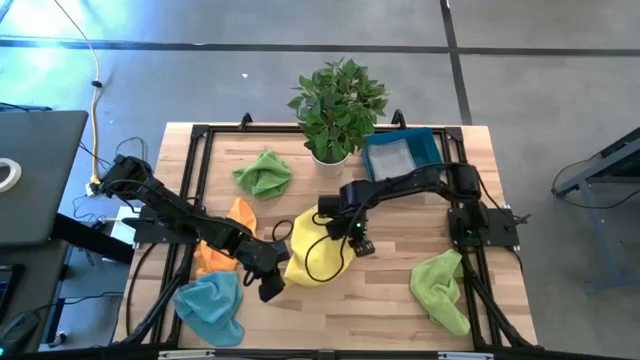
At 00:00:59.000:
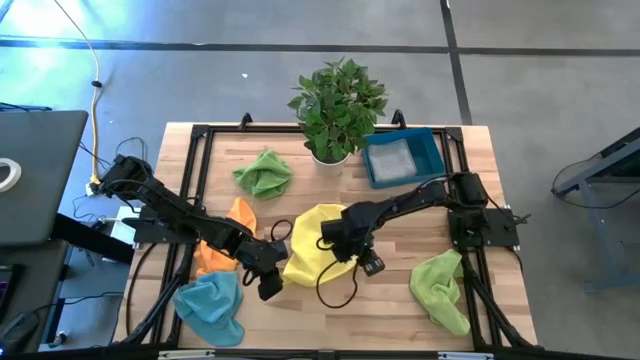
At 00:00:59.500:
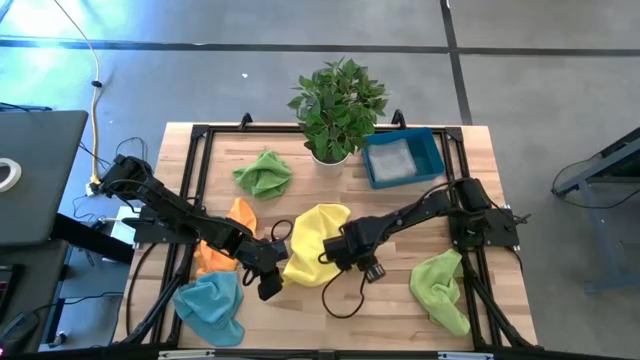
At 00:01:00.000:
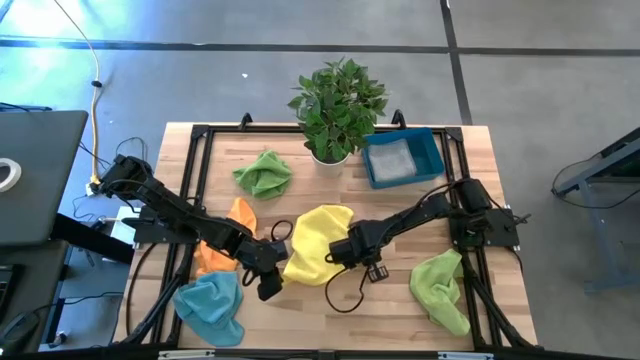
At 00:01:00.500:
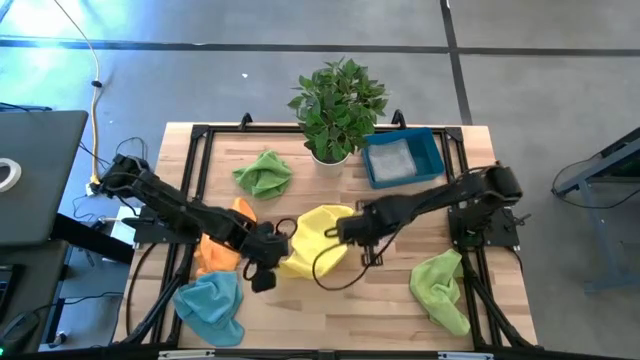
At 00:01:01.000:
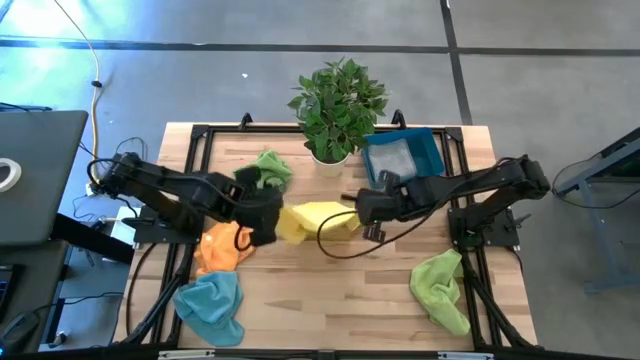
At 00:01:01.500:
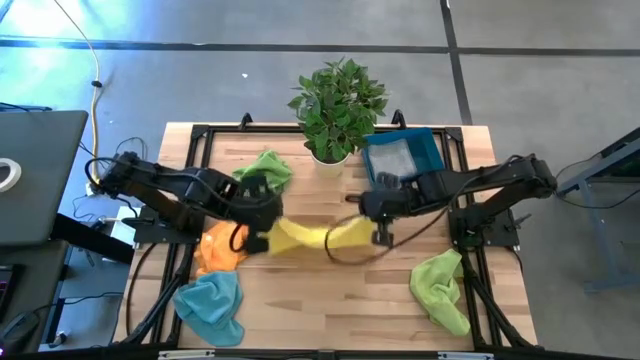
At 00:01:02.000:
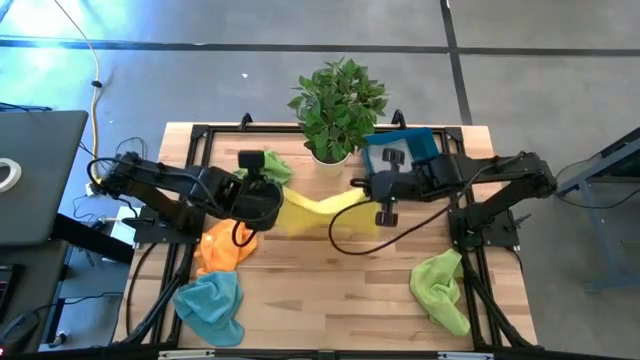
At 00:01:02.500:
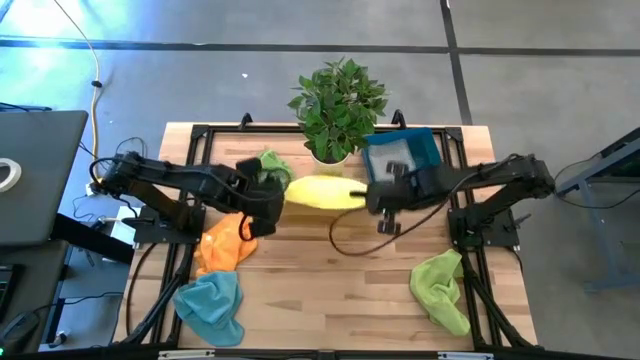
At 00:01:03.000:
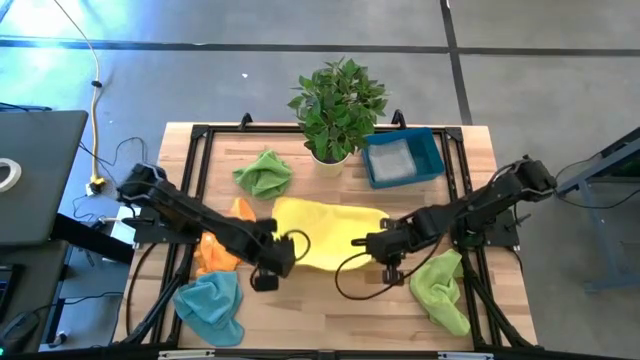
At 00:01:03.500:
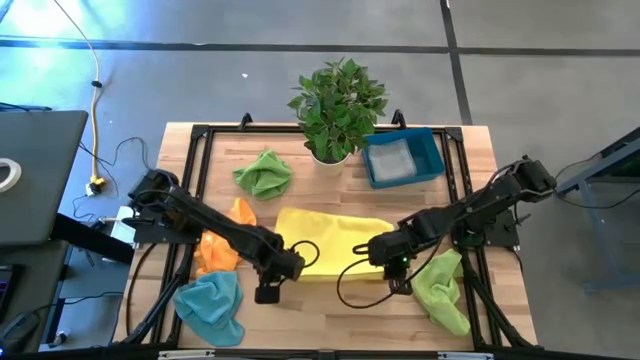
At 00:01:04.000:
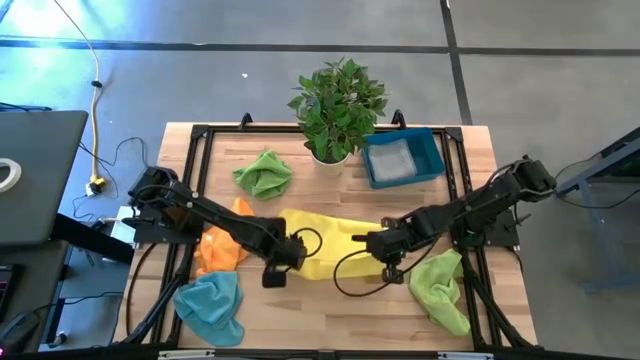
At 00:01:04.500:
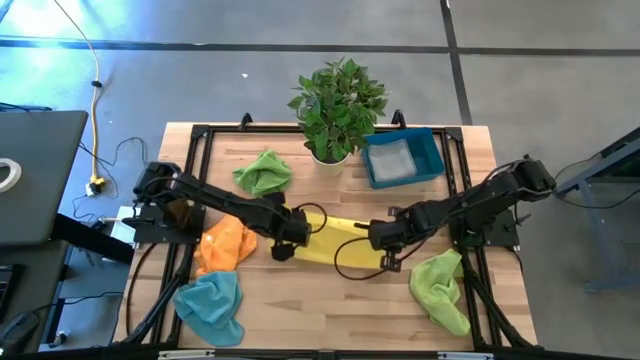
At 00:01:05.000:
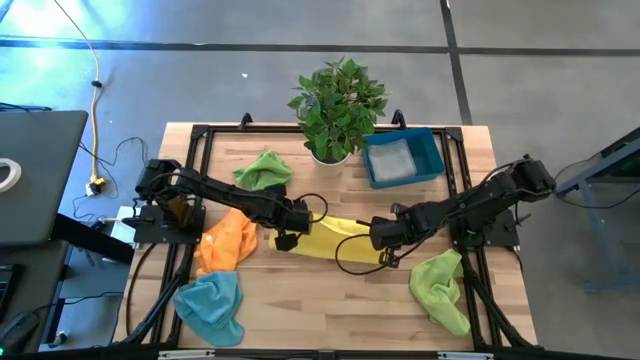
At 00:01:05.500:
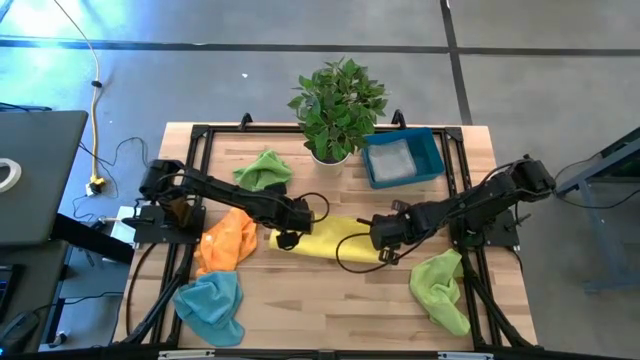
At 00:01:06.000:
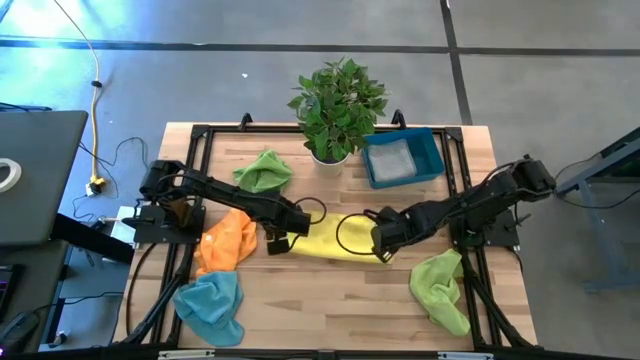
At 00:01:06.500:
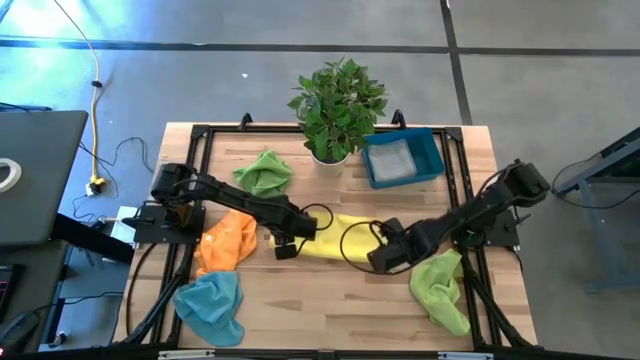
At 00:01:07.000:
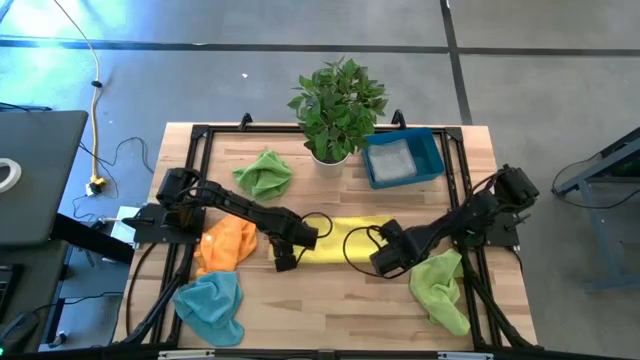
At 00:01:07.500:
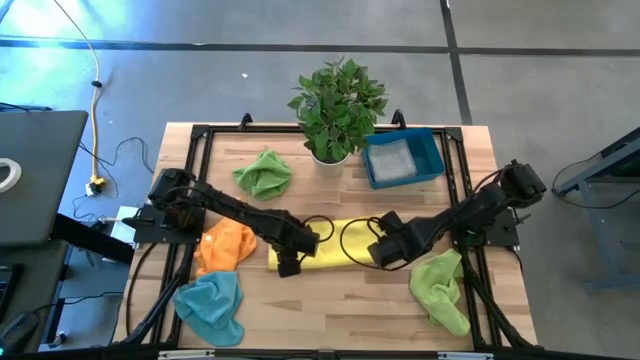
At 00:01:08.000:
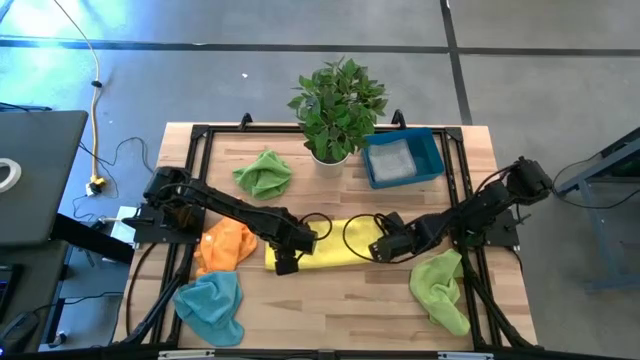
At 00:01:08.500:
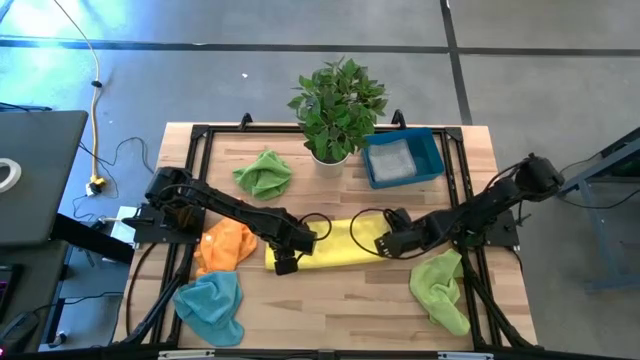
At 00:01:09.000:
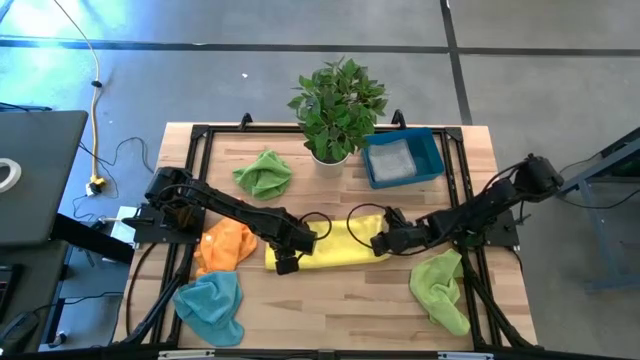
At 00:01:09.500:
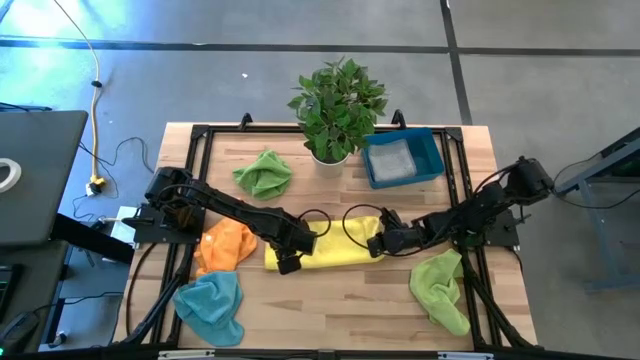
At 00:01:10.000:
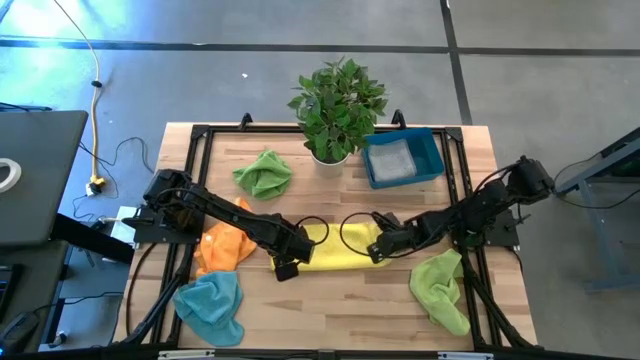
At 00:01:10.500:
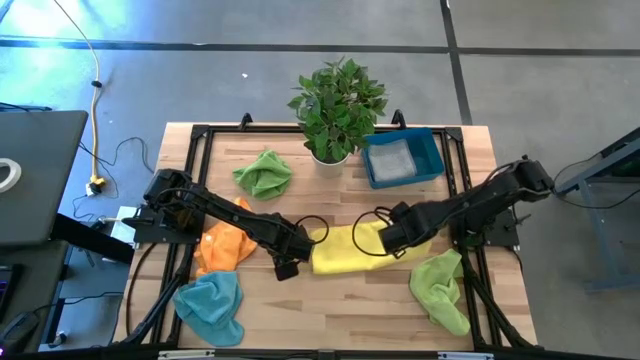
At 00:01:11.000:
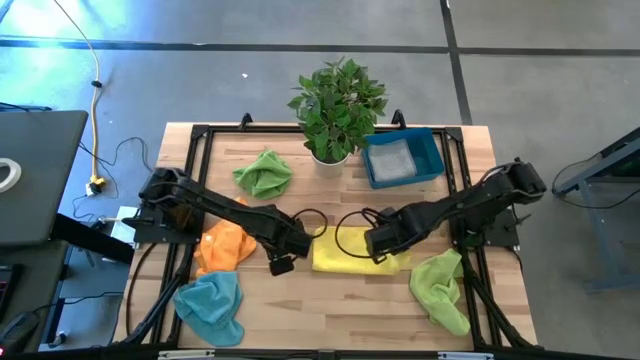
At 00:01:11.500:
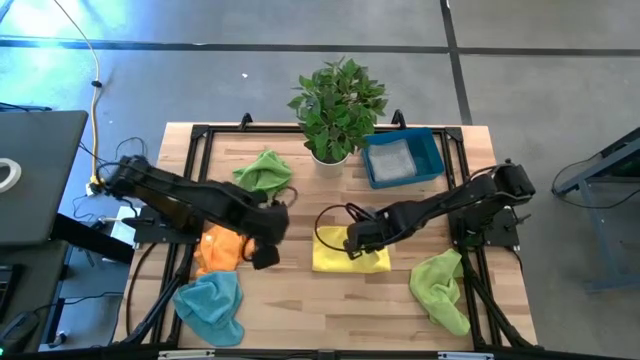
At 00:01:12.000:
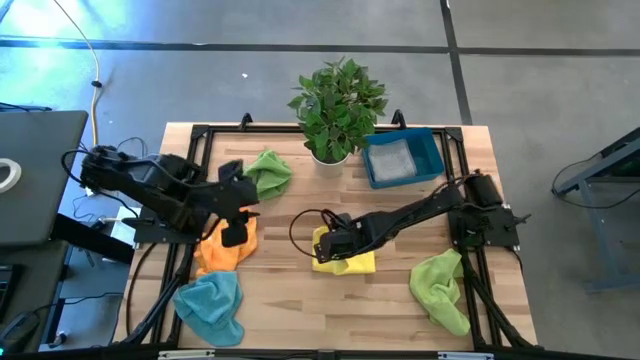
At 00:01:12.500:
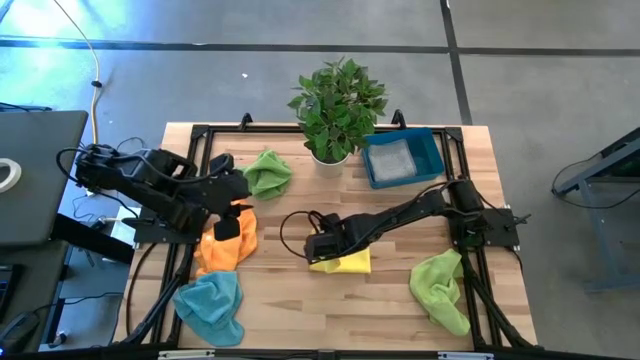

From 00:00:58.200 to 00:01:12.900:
Task: Sort microfiber towel by color & place in baskets
Fold the yellow towel

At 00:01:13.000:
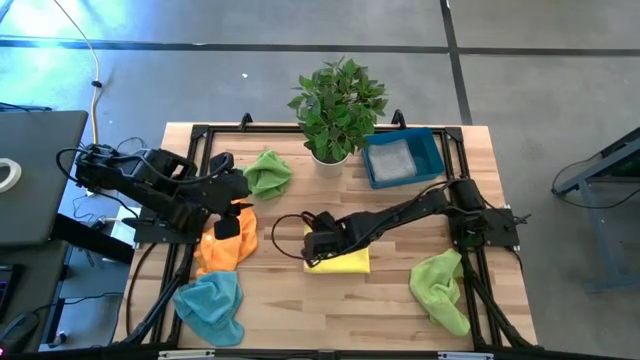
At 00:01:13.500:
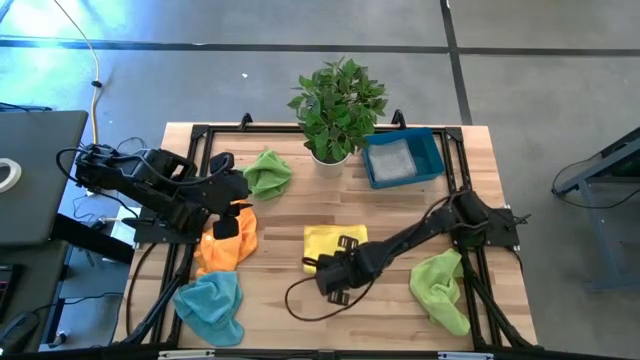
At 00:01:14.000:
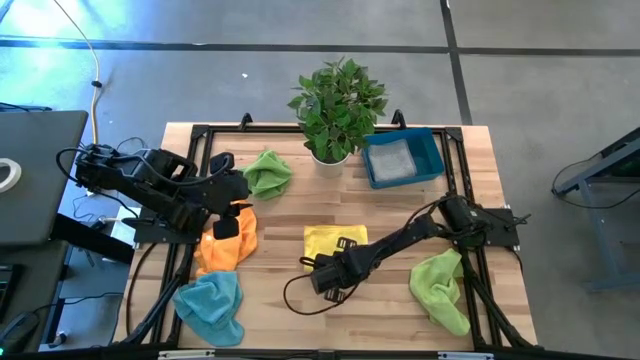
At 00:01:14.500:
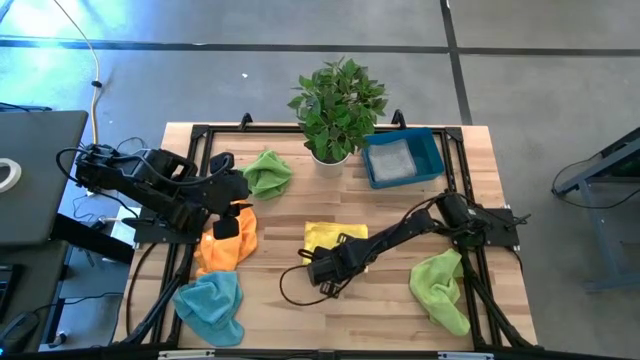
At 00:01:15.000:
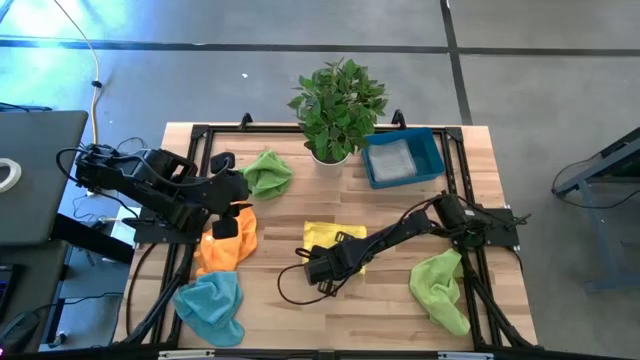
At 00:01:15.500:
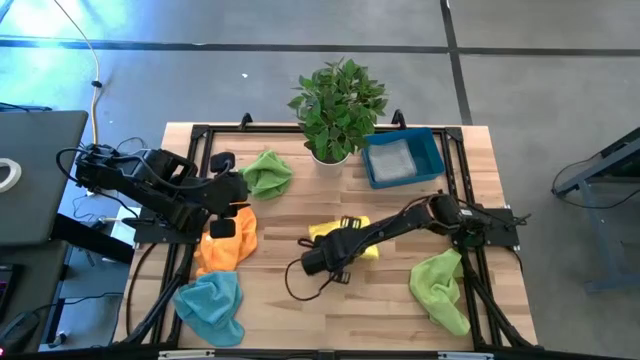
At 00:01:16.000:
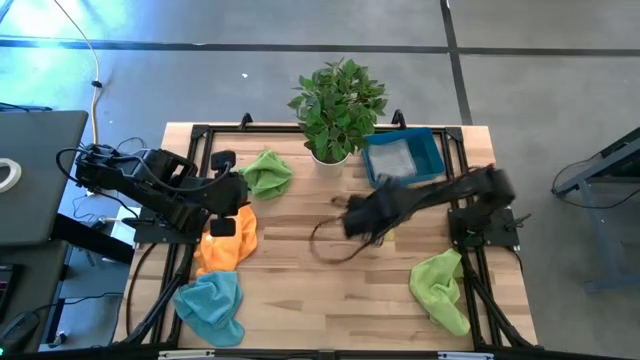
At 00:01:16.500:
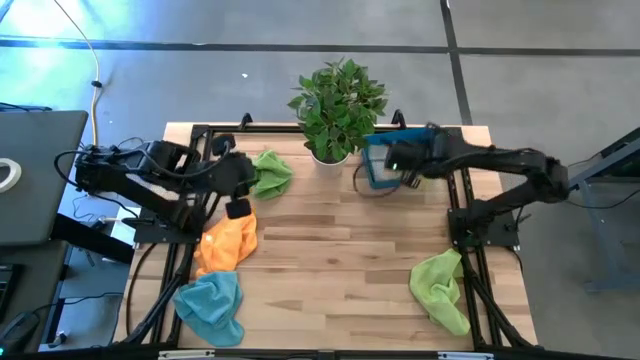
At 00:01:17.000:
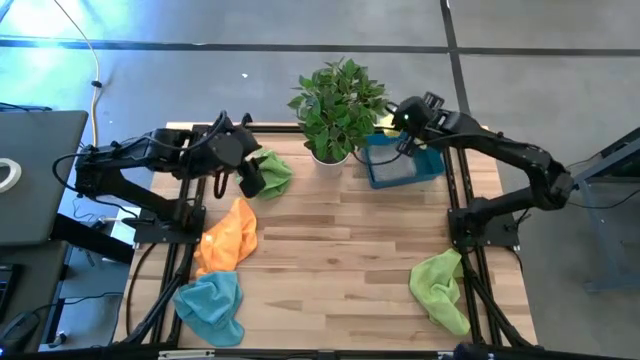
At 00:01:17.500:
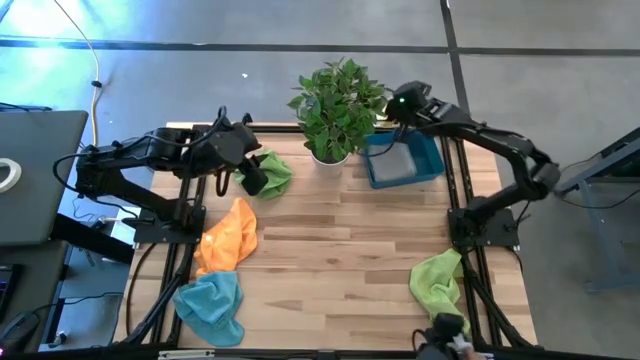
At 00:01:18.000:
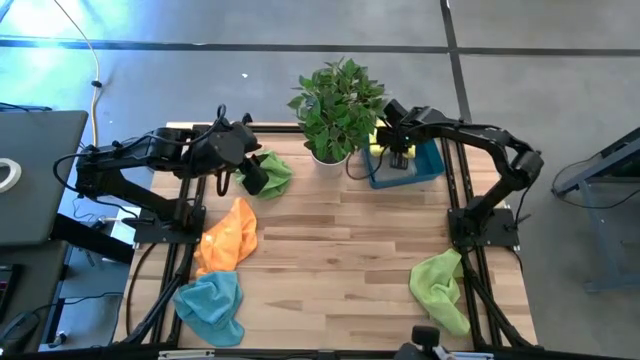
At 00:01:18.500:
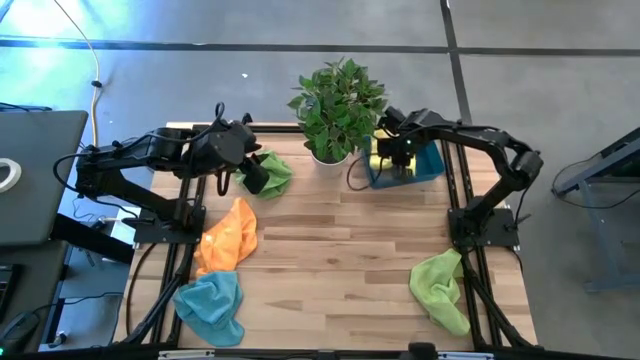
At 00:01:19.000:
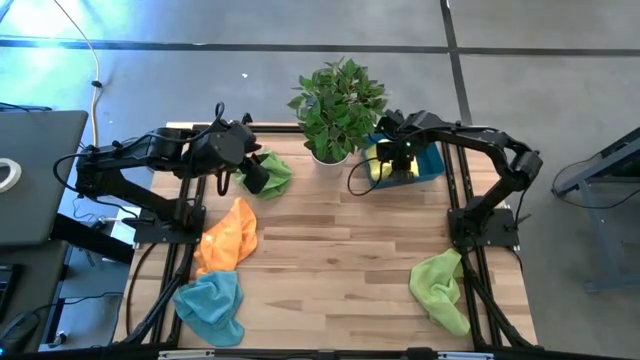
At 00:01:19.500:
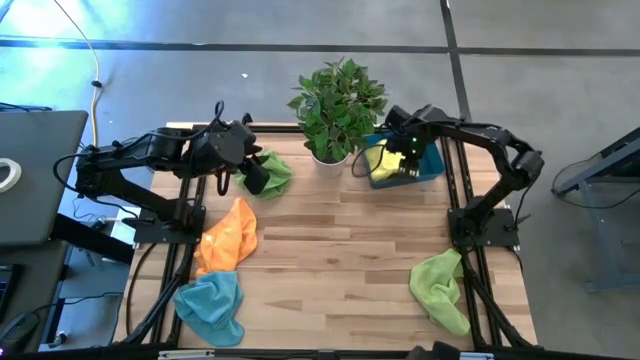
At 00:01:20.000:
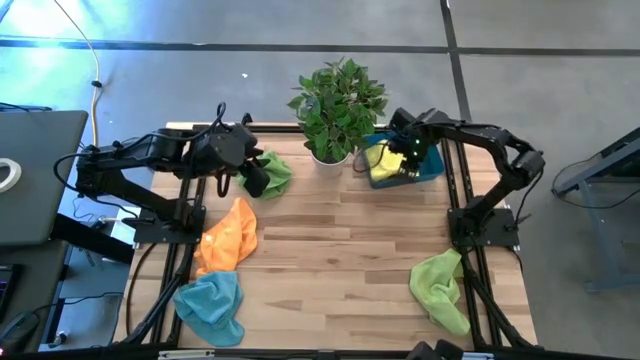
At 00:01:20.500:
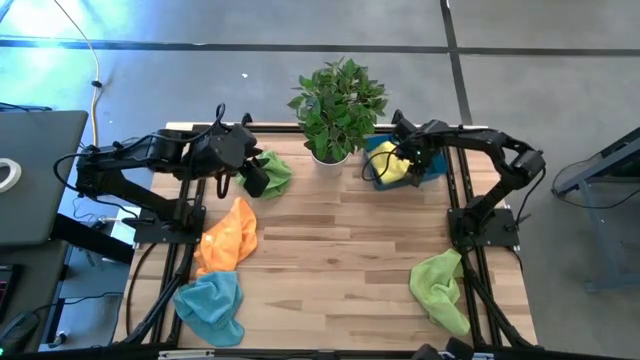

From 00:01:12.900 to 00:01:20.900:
Stack the yellow towel on top of gray towel into the blue bin
